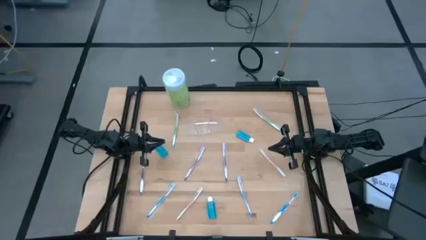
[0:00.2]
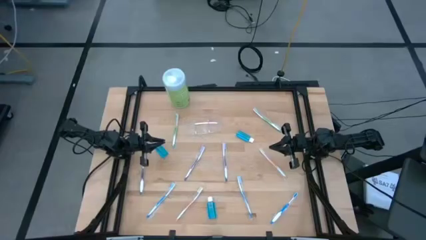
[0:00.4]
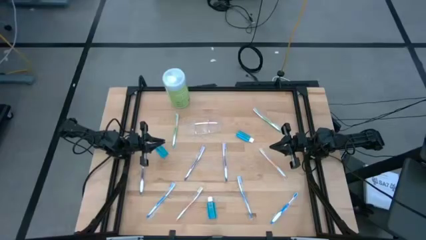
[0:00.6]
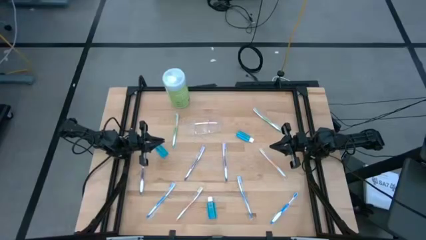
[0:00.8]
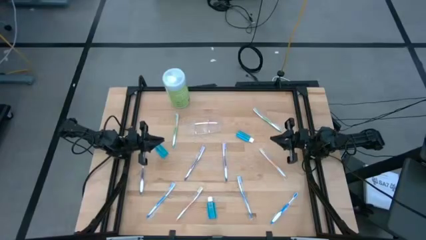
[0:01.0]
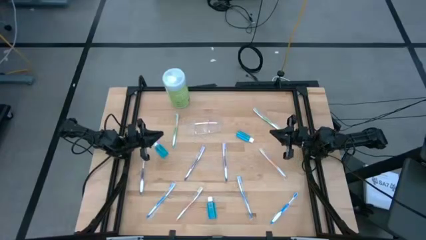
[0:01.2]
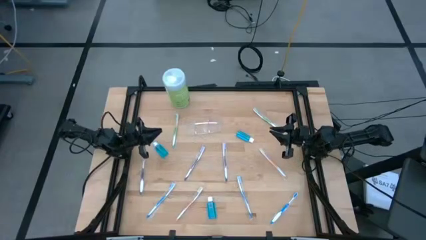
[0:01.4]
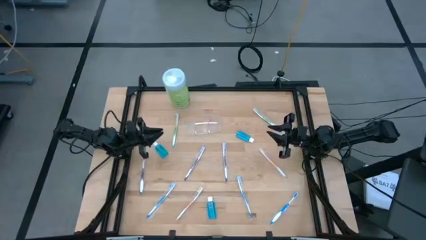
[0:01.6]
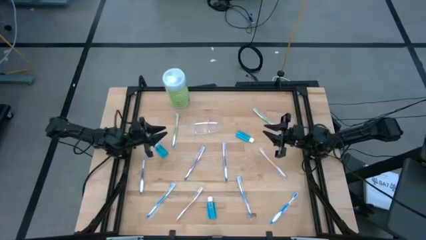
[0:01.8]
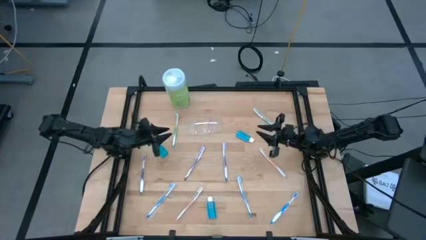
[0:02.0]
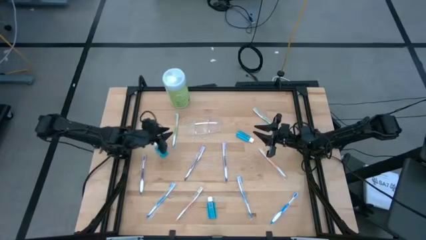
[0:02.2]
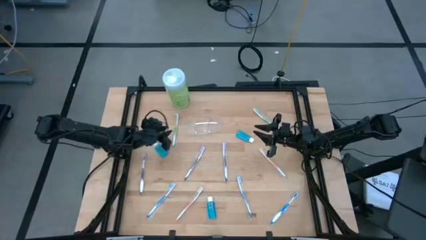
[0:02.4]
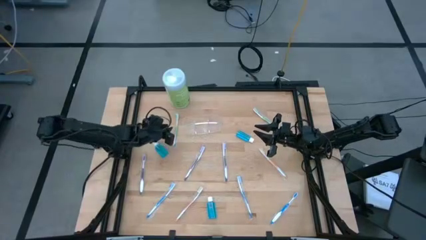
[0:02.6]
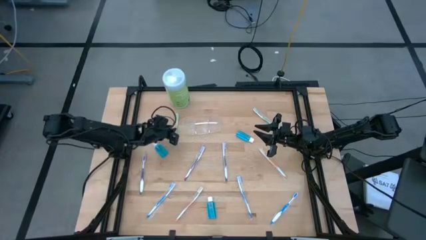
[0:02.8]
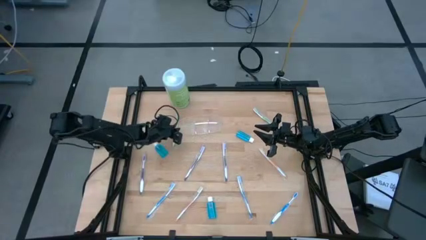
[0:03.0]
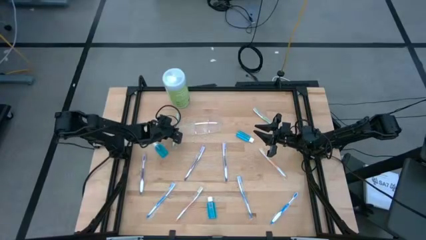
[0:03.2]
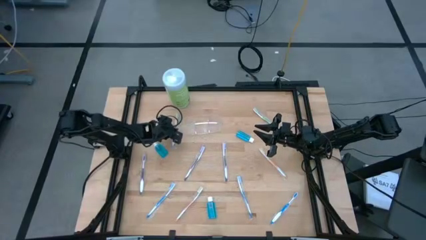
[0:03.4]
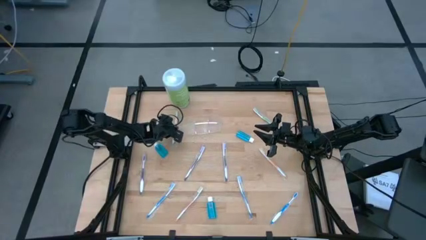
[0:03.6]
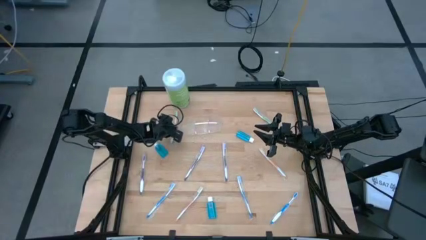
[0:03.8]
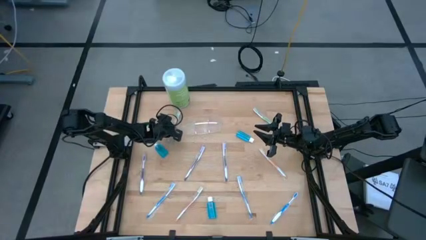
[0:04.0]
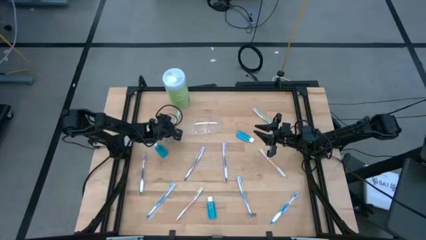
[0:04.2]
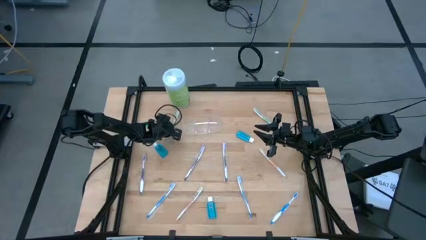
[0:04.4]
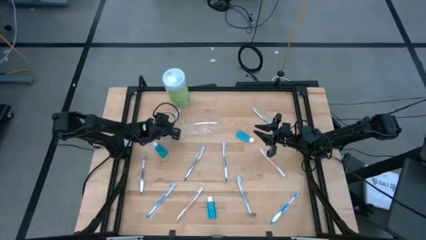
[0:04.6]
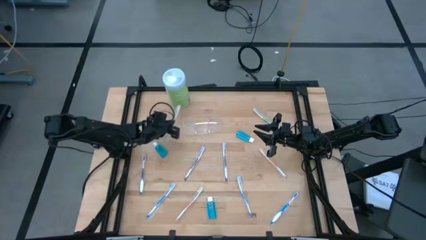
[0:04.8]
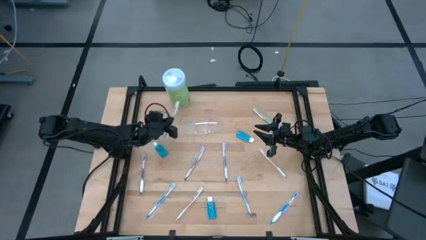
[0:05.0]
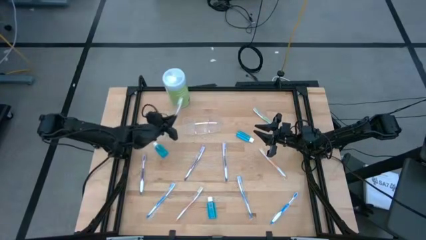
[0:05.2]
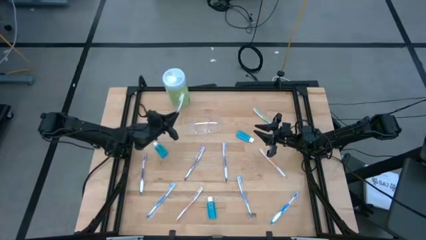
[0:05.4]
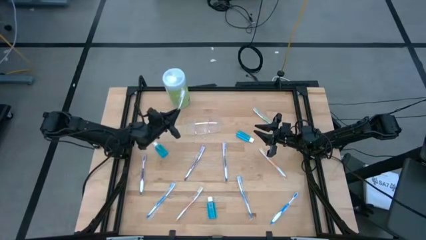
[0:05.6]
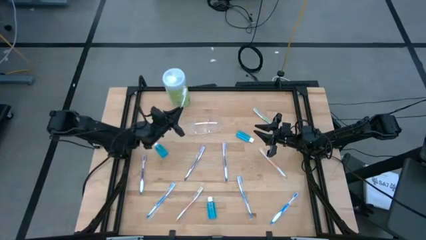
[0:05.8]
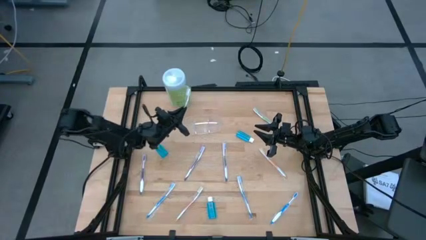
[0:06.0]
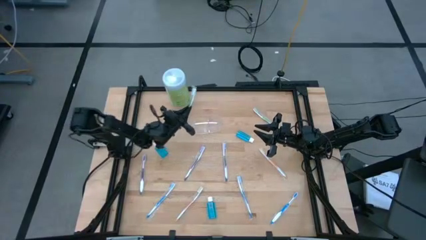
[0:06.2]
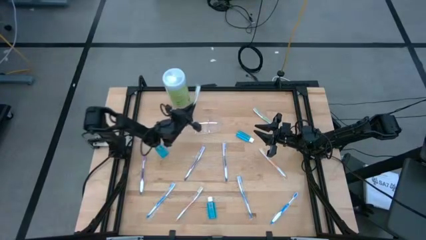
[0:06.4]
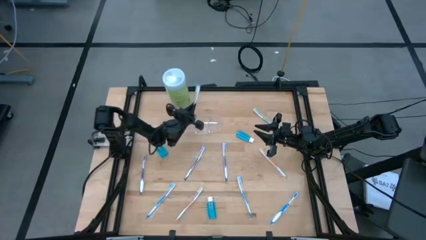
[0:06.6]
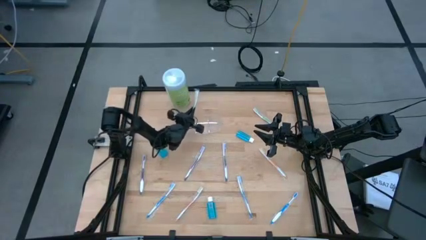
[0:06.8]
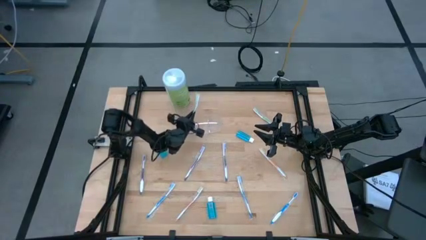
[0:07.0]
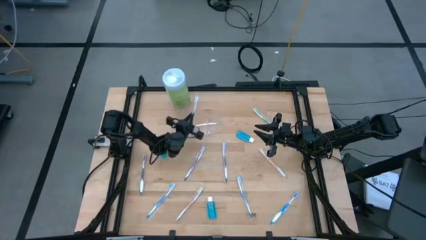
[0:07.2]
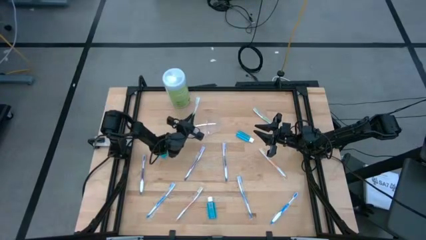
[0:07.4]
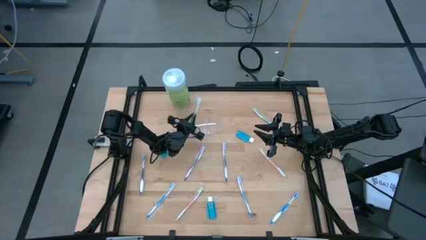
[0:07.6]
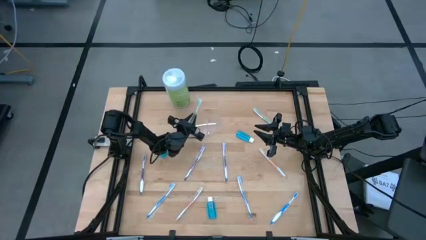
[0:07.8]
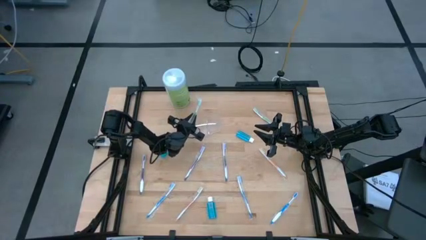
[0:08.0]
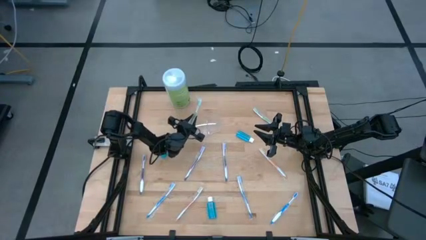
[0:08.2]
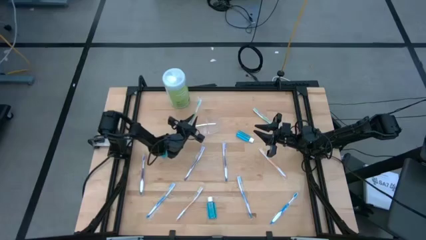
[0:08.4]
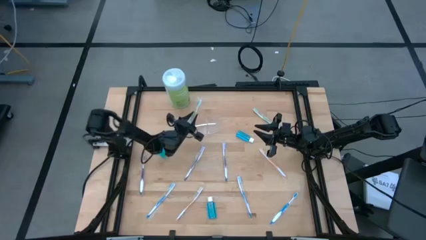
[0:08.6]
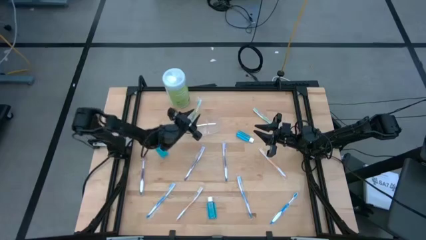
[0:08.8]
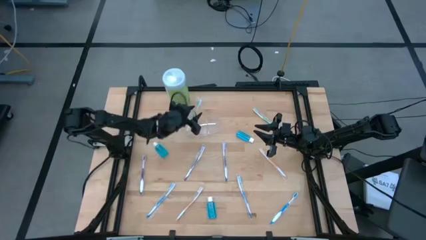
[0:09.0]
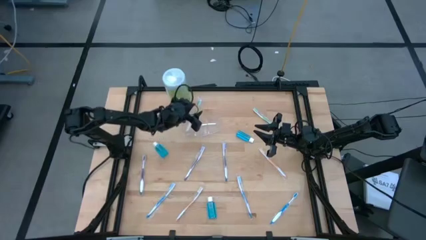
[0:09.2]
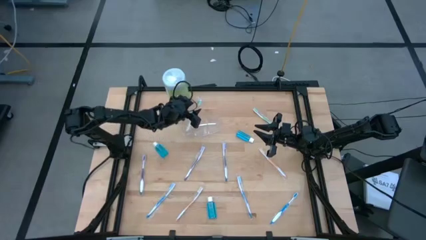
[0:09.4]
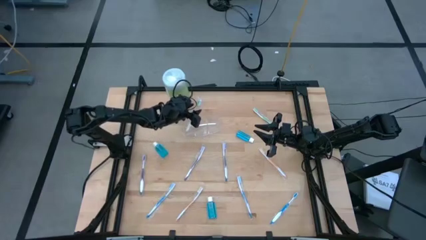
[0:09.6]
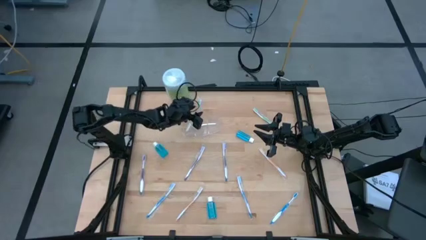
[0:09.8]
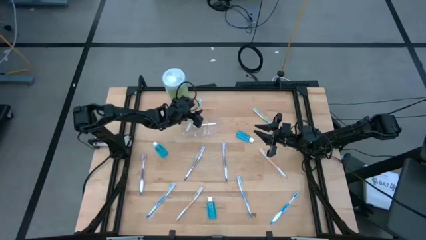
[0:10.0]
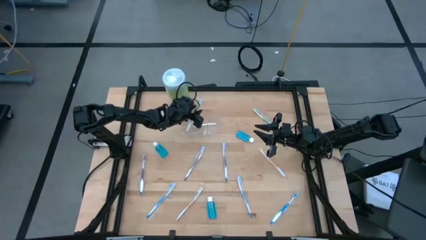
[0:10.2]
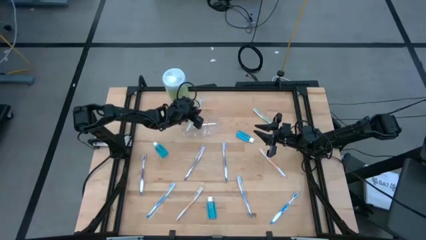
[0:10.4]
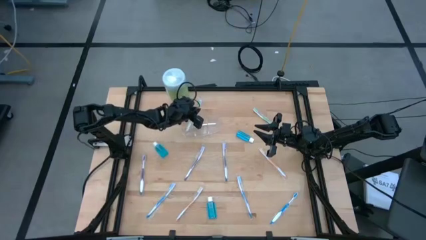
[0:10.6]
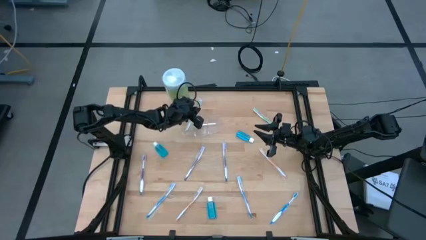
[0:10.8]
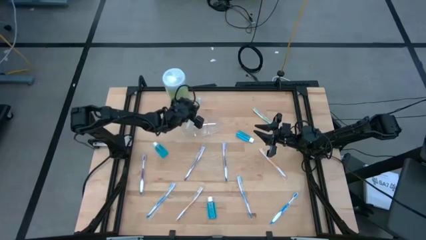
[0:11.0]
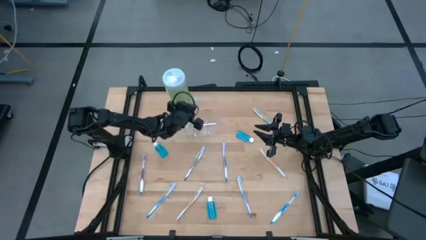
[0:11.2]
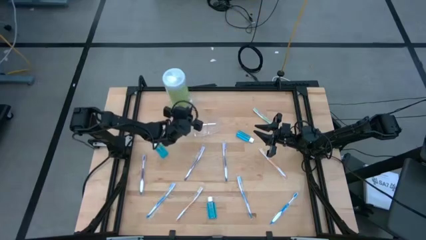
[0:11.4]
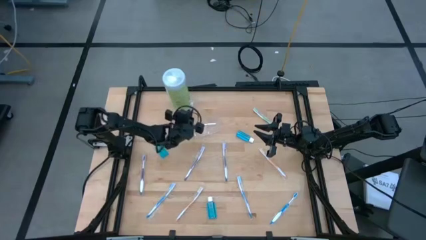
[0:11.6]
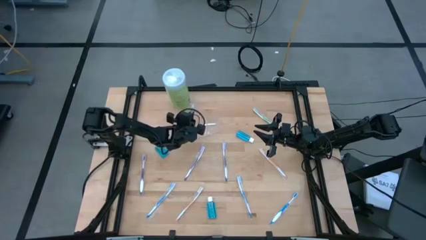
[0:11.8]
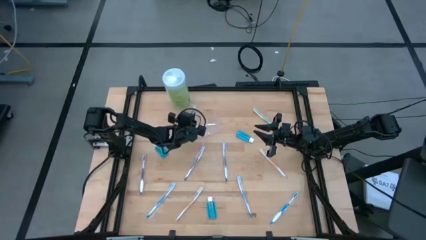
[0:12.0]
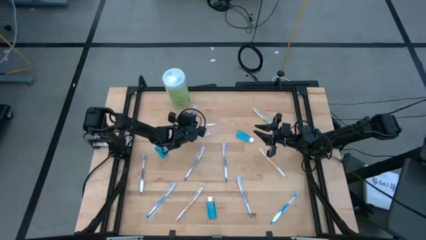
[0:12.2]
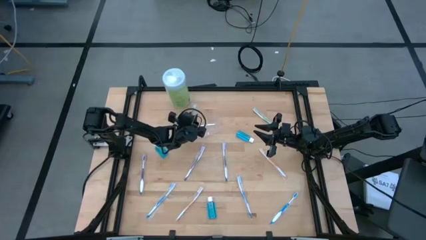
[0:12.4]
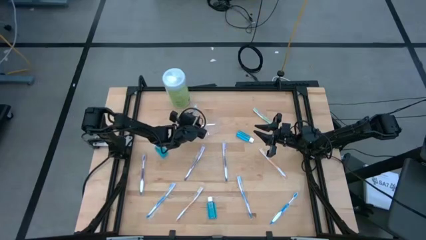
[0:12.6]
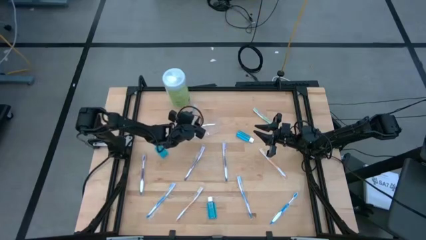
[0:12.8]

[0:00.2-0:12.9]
Task: Pick & Place toothbrushing station
Put the left green toothbrush into the transparent organizer
